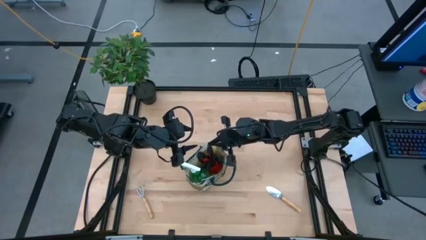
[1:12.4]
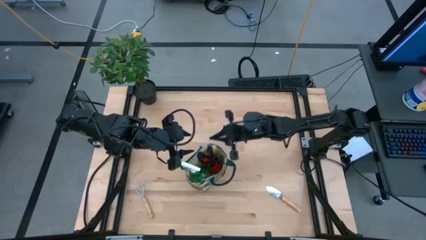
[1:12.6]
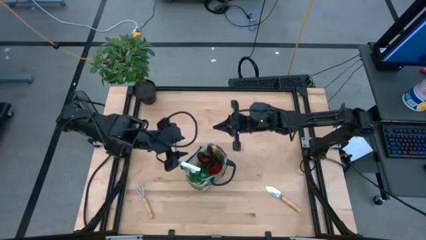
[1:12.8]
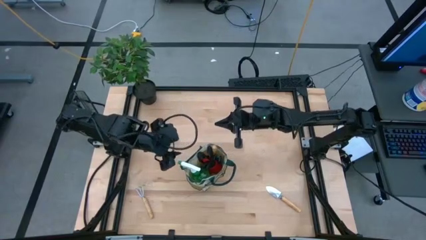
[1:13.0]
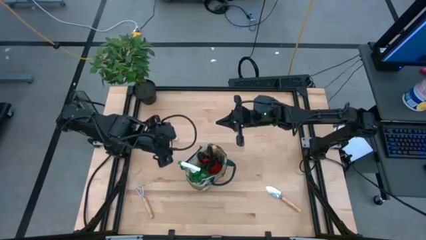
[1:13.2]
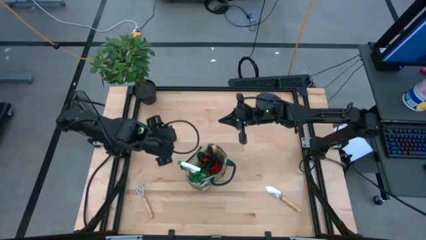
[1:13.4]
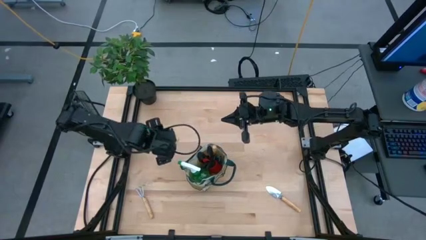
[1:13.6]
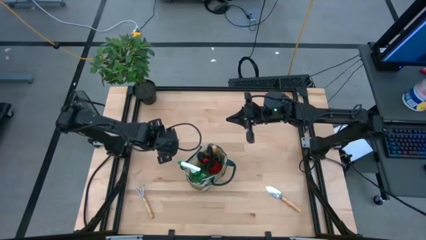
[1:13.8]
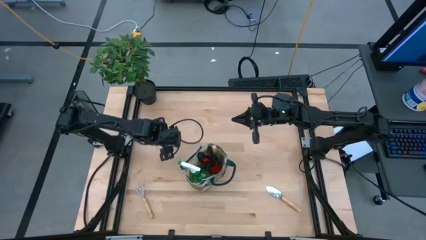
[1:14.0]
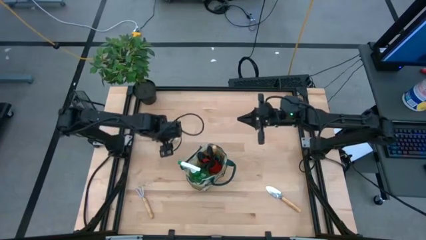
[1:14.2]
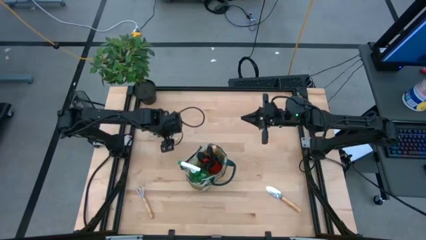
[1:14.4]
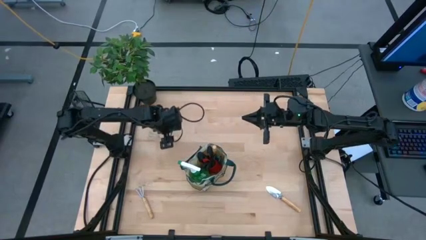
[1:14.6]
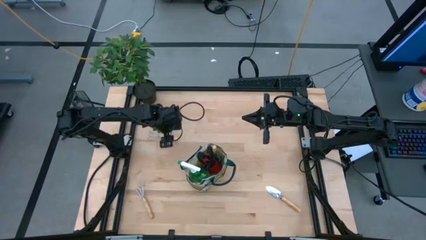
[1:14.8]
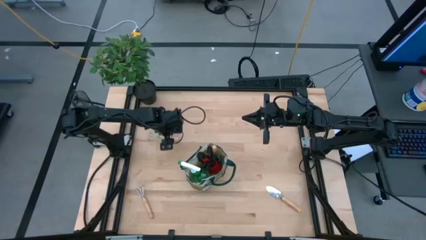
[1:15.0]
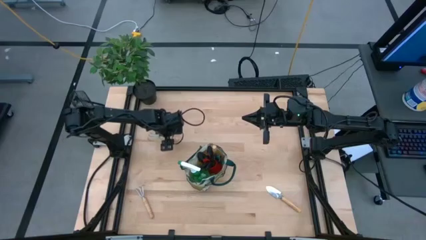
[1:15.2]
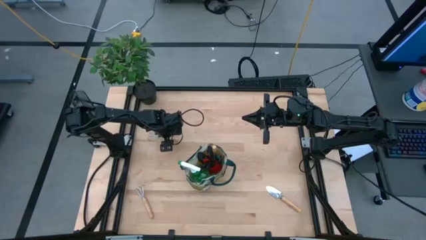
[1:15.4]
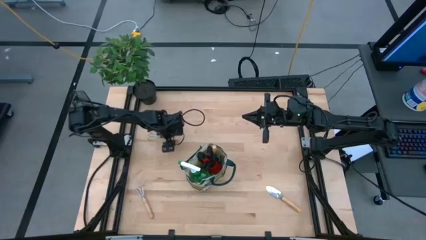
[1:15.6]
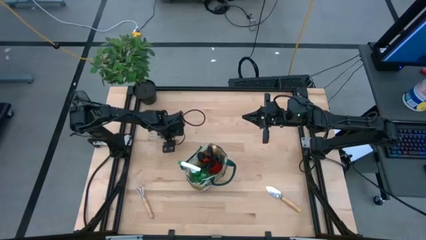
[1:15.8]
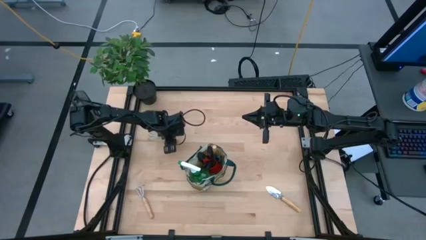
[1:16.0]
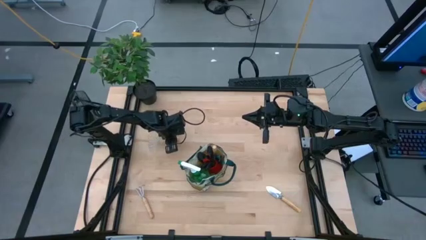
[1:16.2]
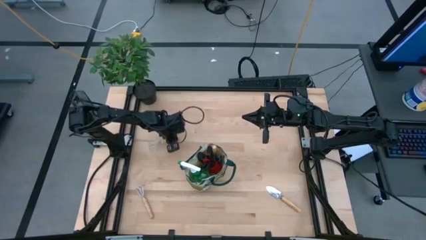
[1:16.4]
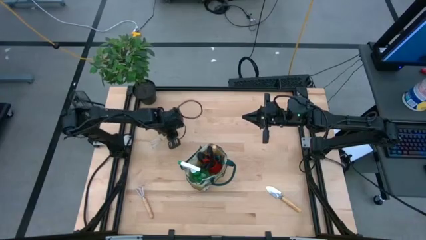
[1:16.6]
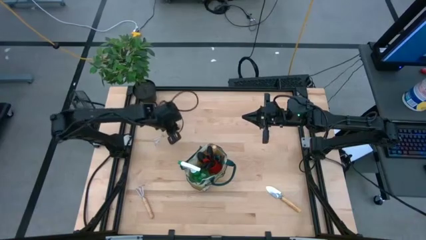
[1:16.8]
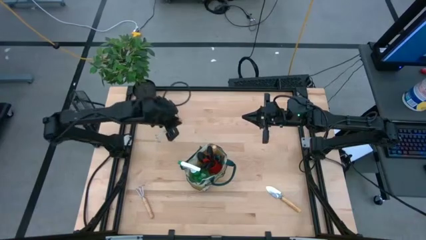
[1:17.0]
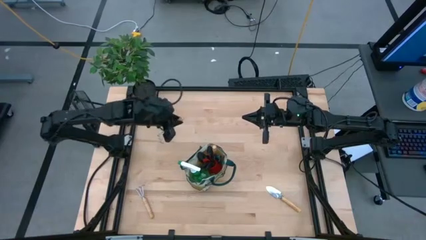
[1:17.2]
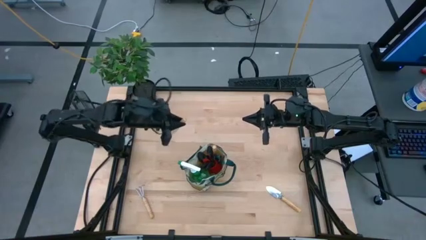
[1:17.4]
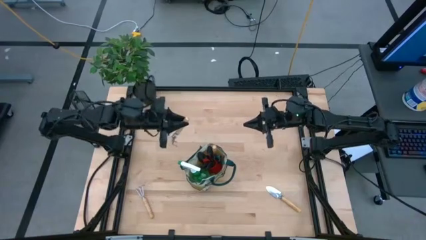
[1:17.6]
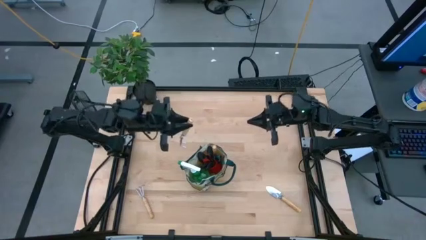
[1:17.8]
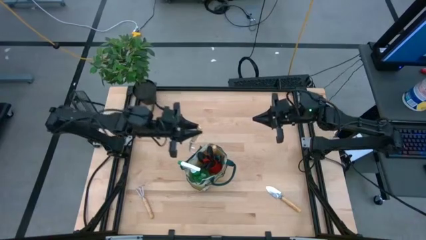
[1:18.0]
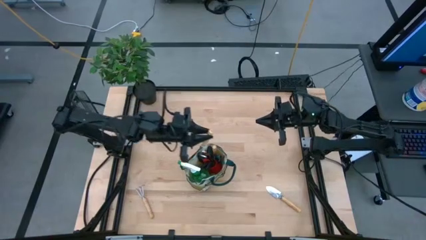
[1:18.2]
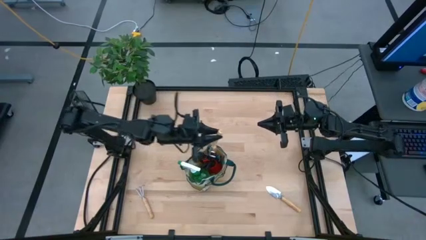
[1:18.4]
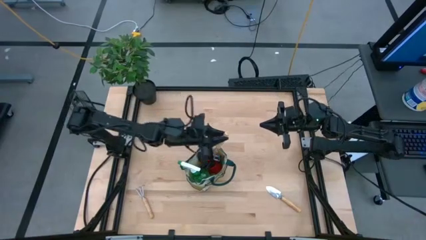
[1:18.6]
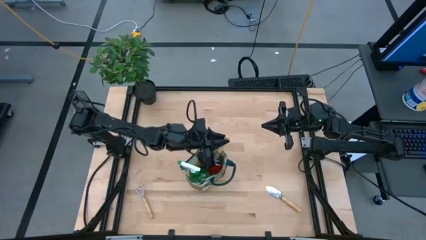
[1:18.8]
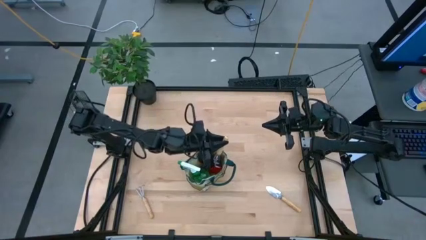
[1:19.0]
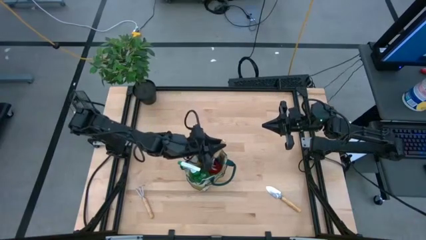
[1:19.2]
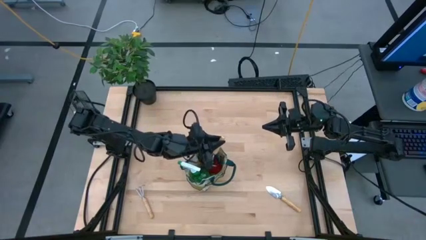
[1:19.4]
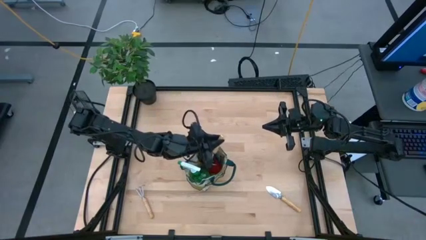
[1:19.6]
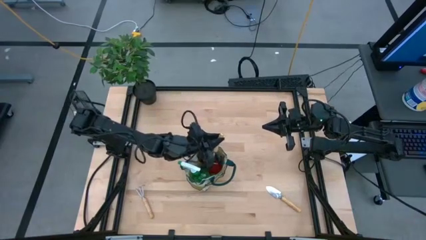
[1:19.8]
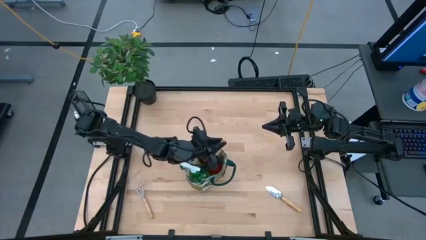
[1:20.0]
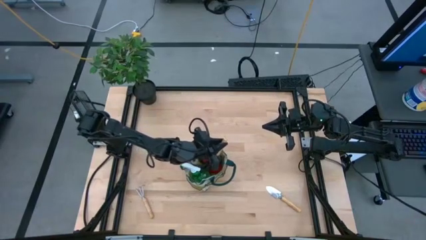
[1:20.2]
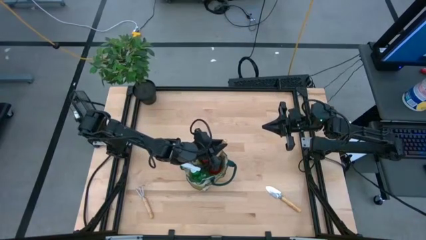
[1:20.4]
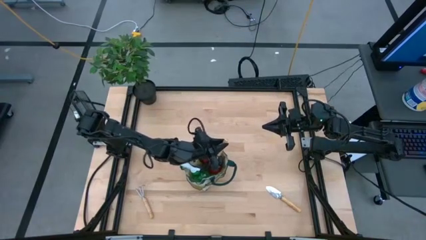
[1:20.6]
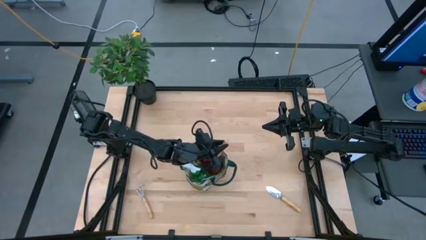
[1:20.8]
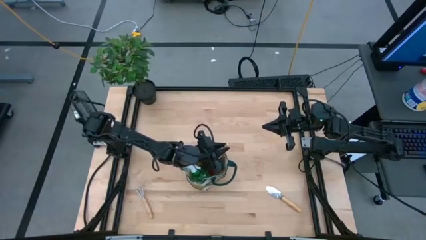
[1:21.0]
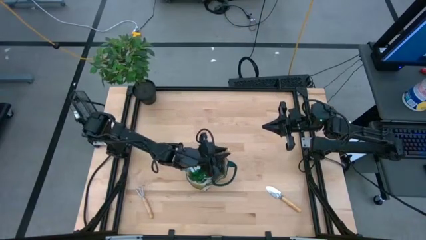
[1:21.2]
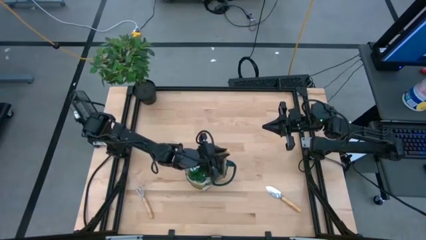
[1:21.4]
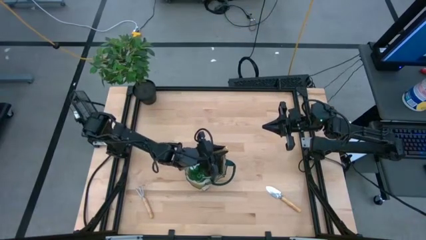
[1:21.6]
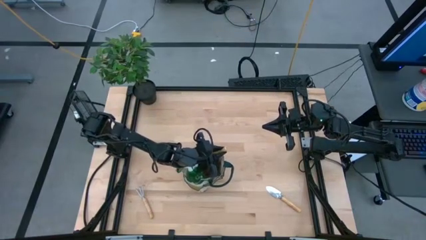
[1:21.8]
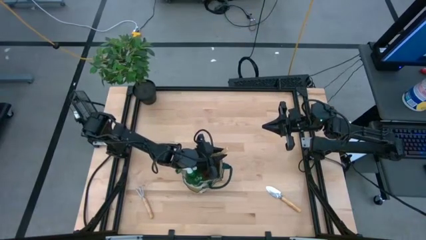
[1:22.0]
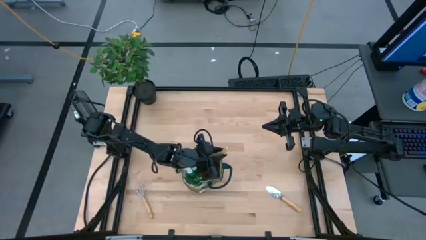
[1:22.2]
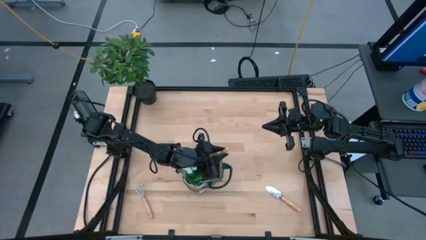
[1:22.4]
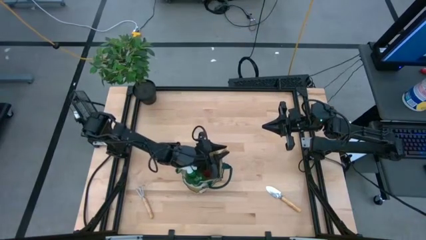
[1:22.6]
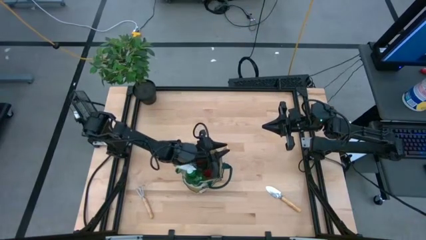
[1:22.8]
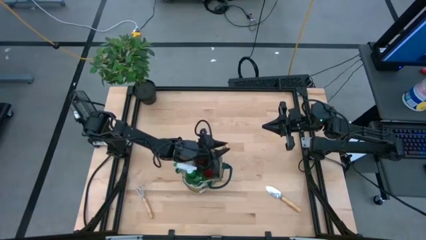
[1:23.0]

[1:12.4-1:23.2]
Task: Pick & Place Garden tools in Gardening bag
Put the top hand rake into the gardening bag

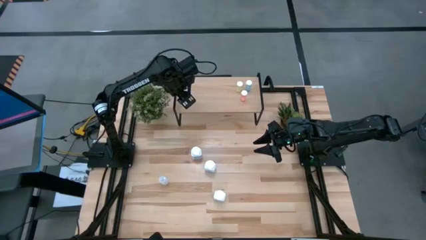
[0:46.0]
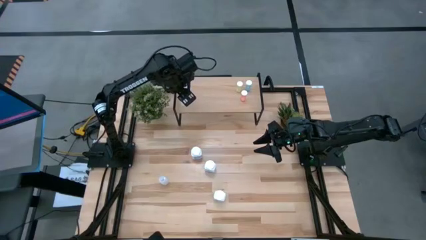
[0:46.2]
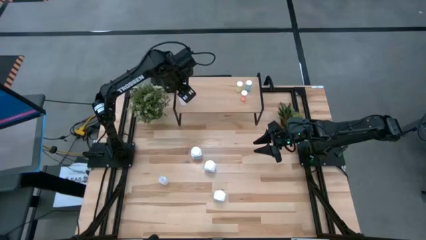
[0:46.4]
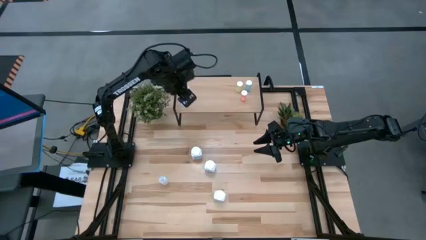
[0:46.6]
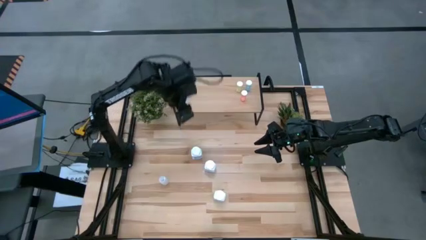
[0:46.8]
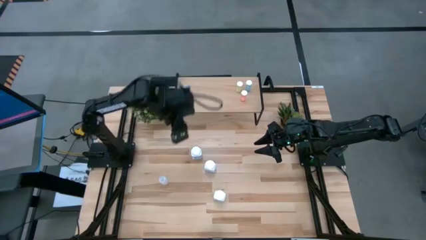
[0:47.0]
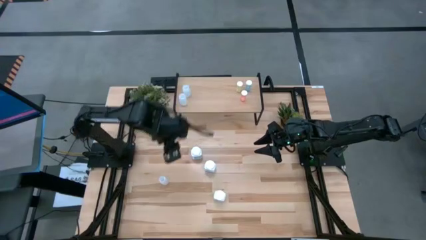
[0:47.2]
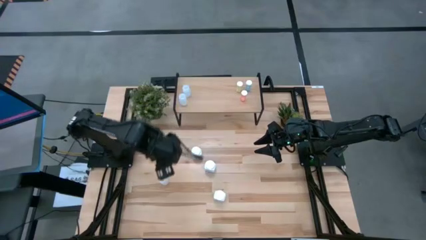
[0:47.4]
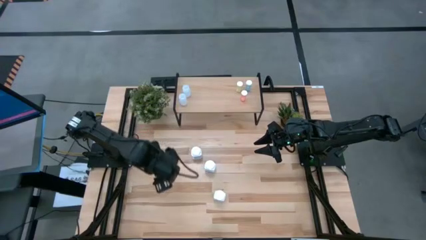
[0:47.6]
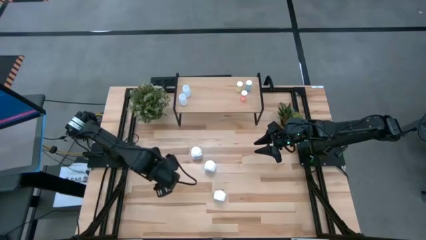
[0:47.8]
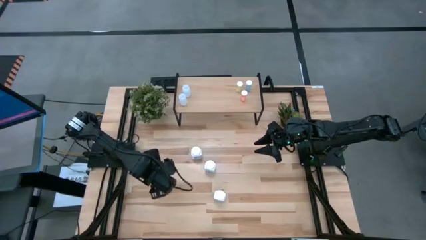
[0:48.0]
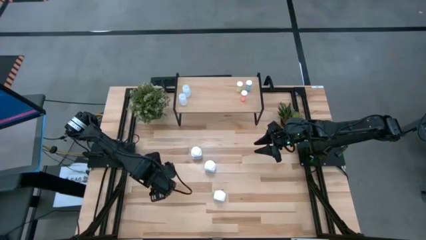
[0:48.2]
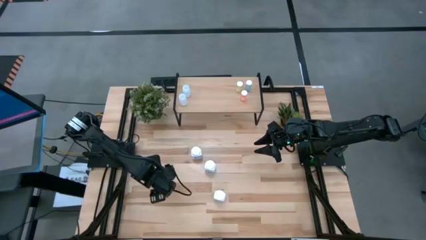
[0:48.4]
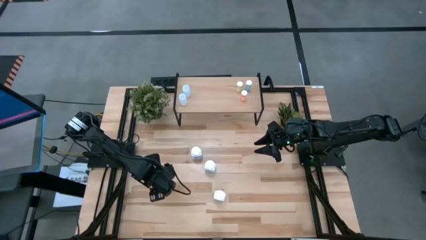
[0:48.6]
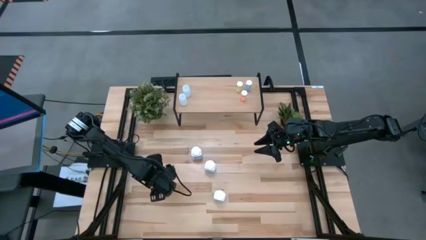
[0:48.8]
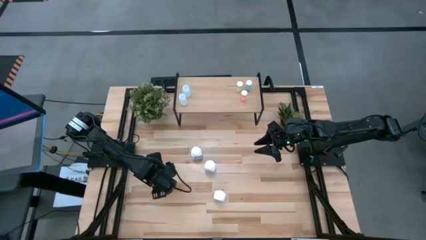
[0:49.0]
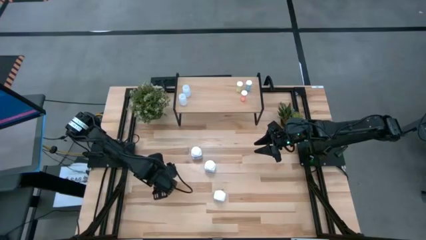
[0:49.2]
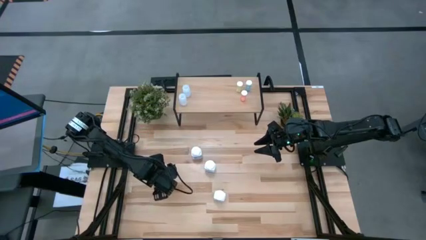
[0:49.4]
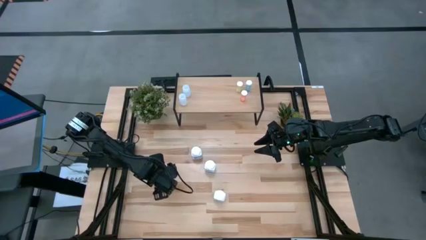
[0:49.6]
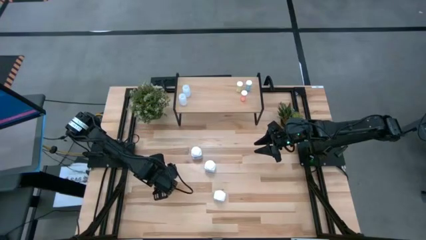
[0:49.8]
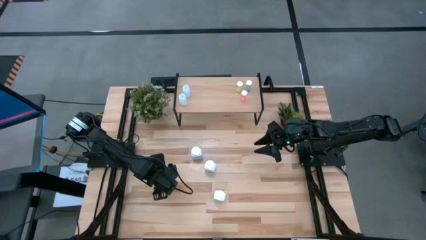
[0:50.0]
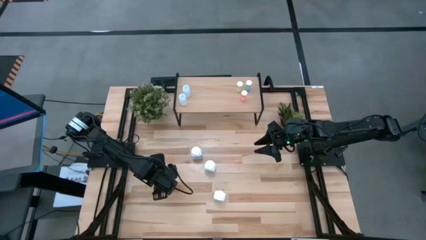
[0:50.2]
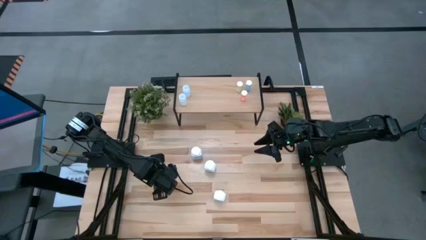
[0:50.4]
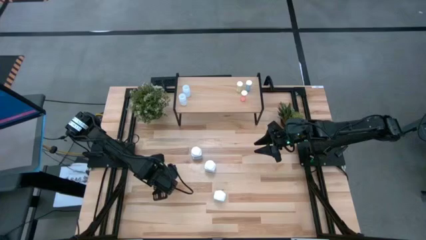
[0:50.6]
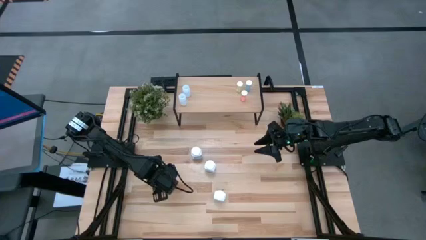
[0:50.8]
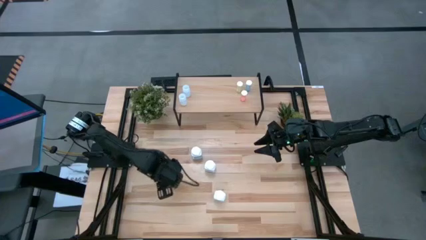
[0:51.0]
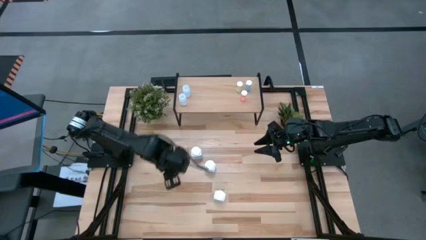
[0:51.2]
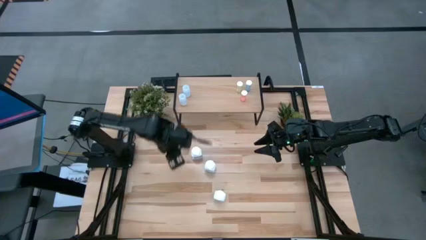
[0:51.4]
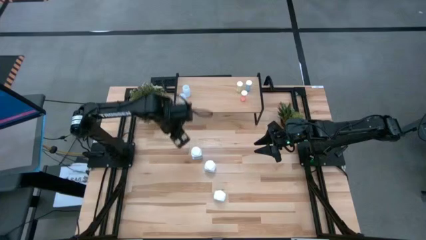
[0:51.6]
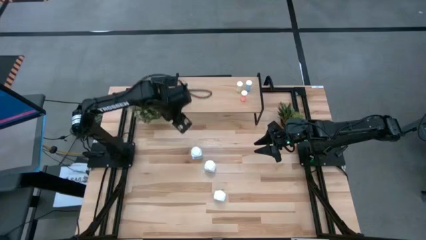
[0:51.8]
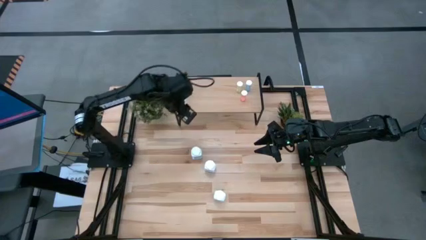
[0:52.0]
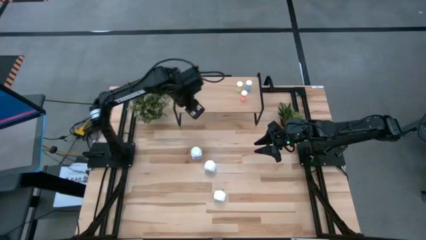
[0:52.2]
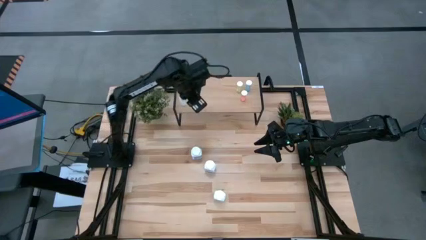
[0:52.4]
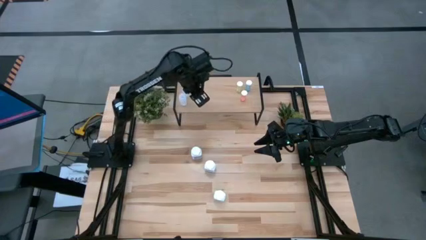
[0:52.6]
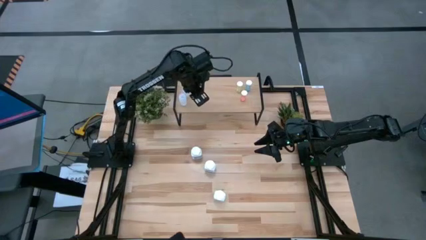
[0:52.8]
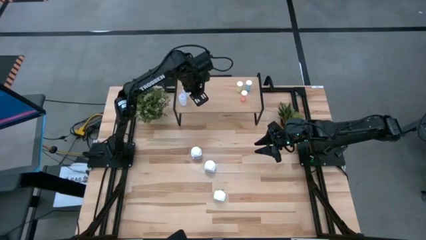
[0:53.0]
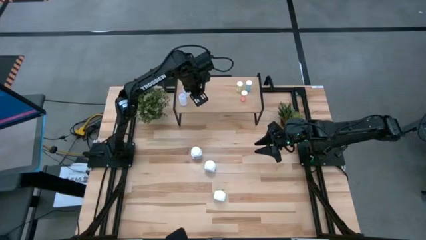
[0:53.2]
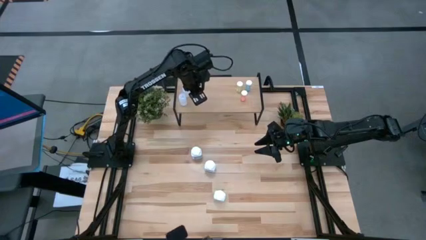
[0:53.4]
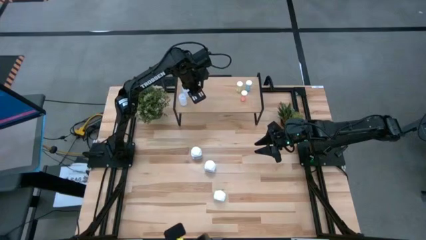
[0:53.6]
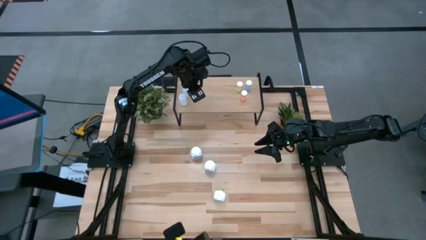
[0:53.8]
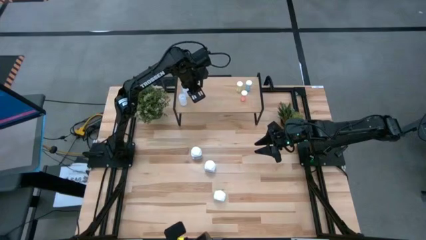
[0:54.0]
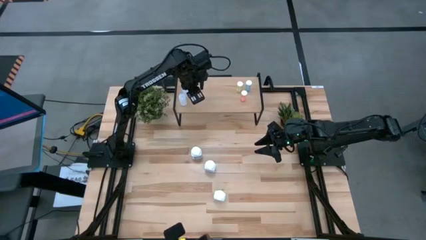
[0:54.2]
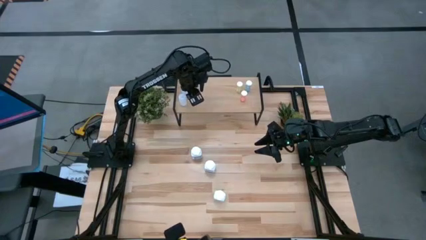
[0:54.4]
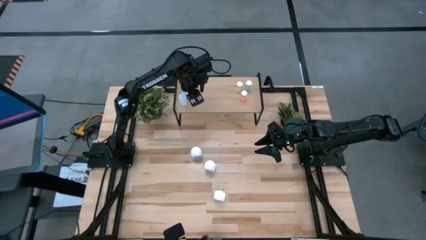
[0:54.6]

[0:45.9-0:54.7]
Task: Pick and place medicine bottles onto shelf by color
Put the white pill bottle on the shelf
